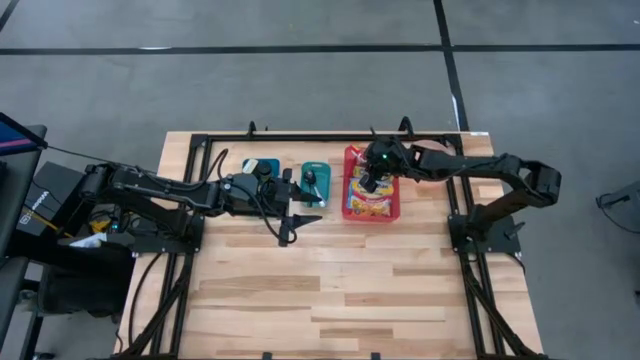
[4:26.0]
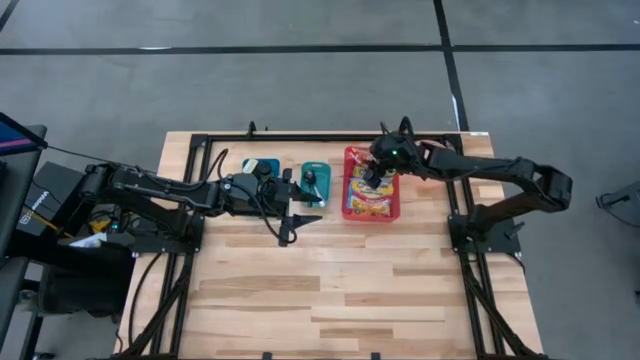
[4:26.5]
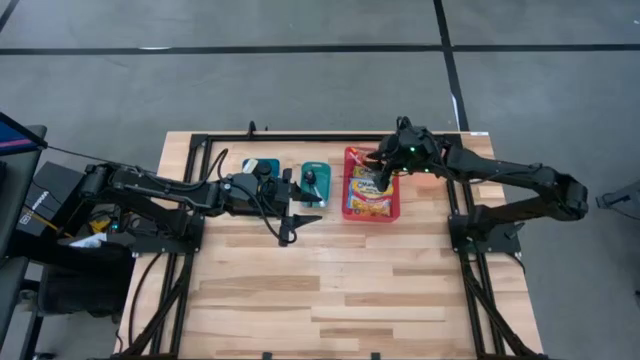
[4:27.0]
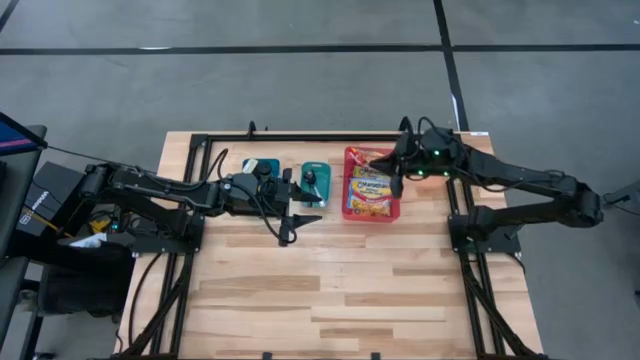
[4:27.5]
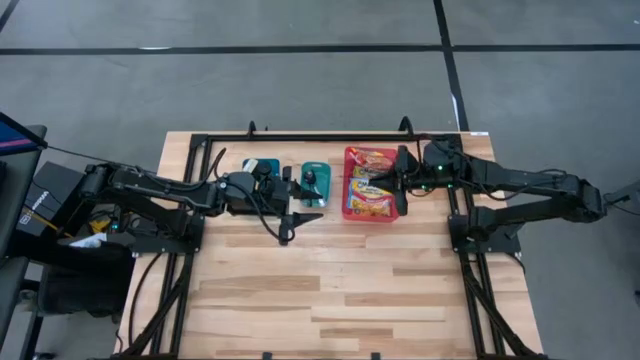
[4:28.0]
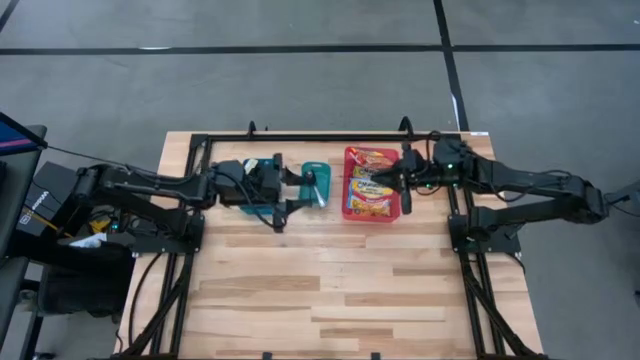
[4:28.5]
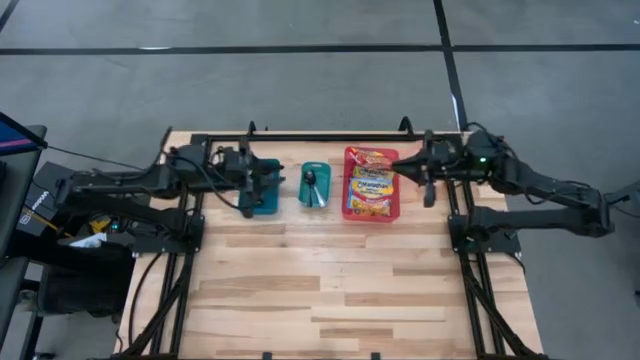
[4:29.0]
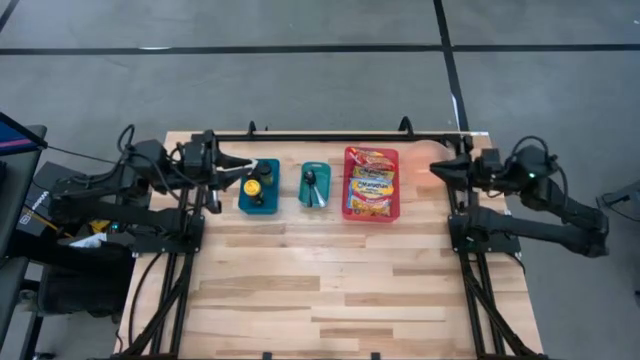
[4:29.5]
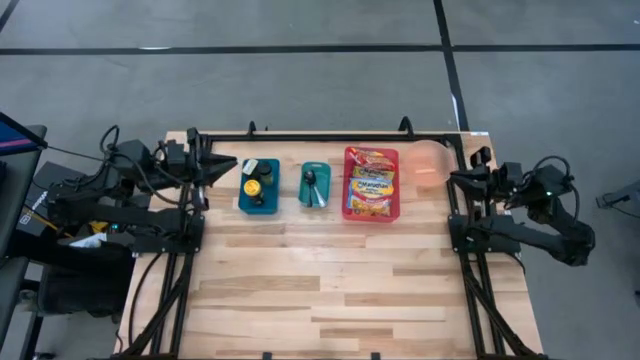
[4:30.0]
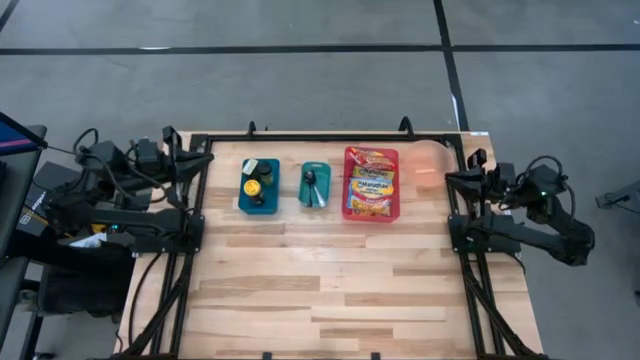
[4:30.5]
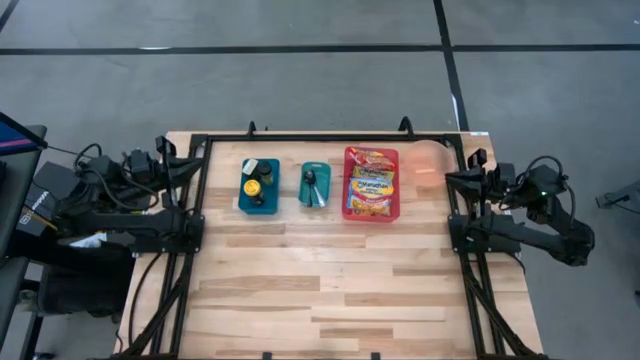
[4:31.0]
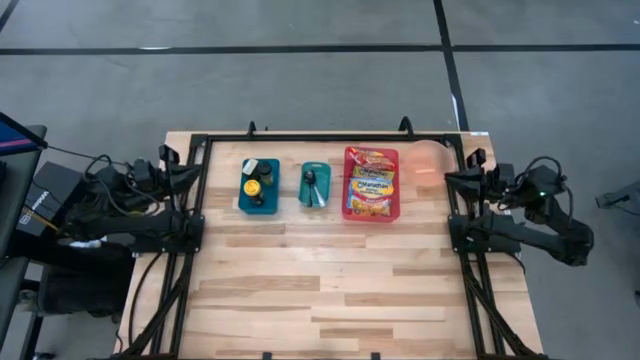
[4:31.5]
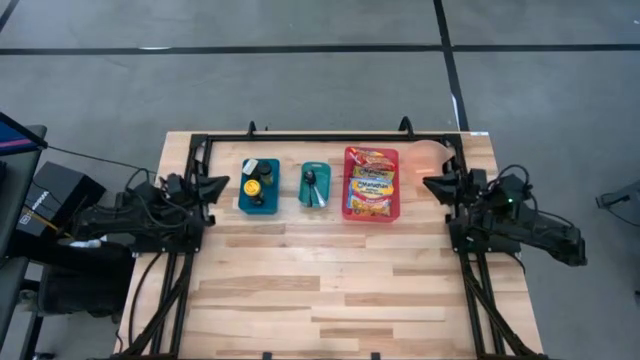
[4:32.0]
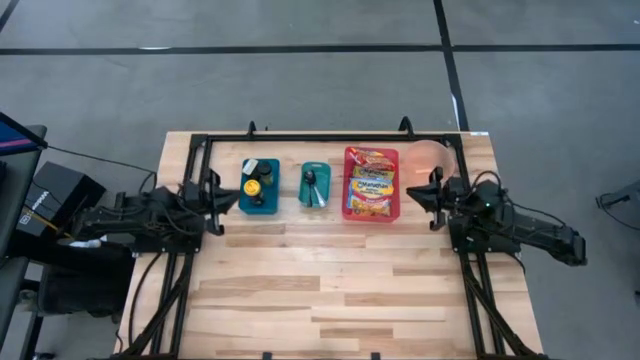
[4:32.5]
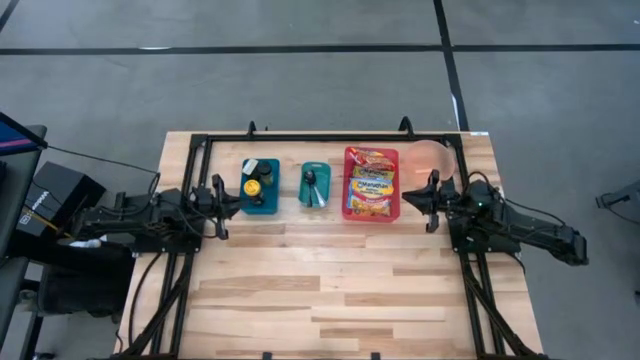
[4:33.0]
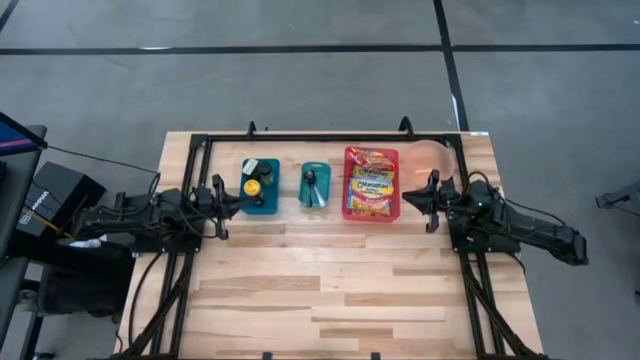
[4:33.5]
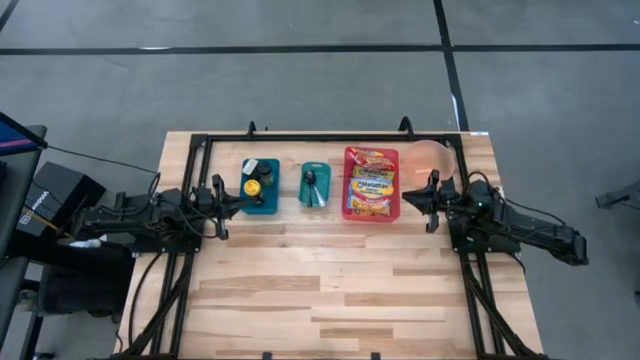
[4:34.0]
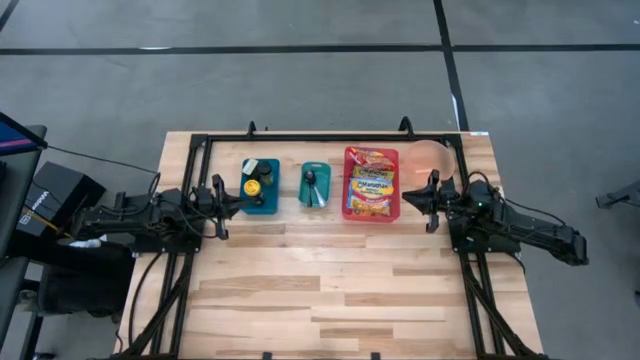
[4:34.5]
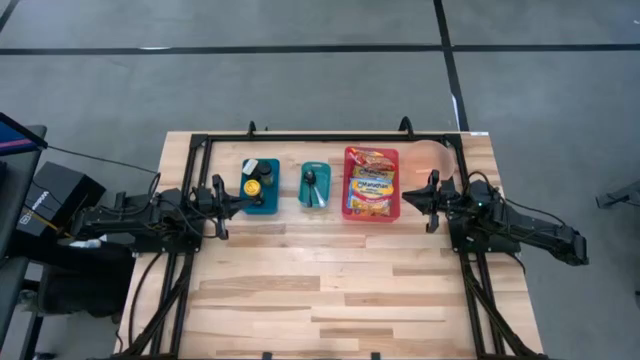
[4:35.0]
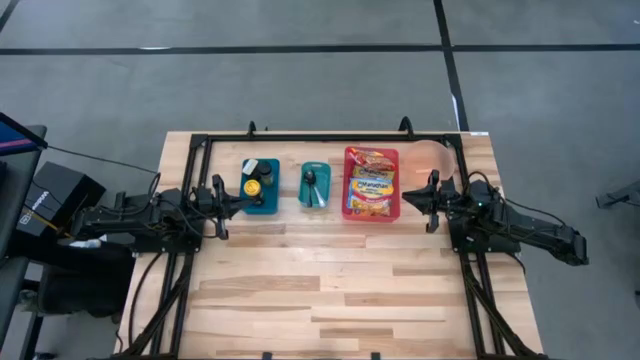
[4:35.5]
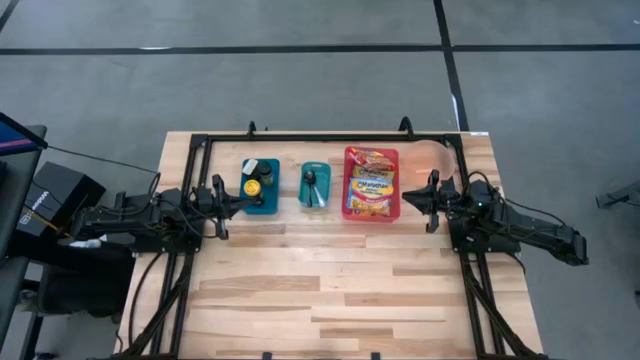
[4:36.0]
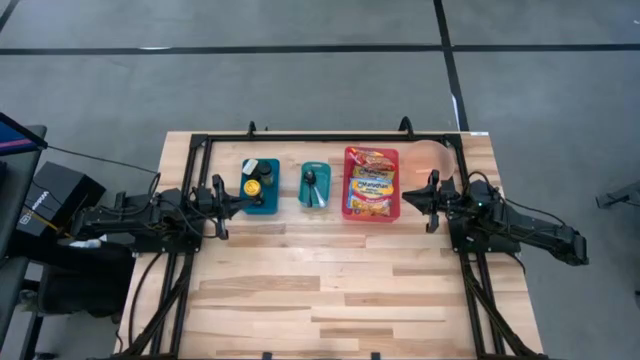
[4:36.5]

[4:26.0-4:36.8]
Task: Pick & Place Food Item
Return to Home Position

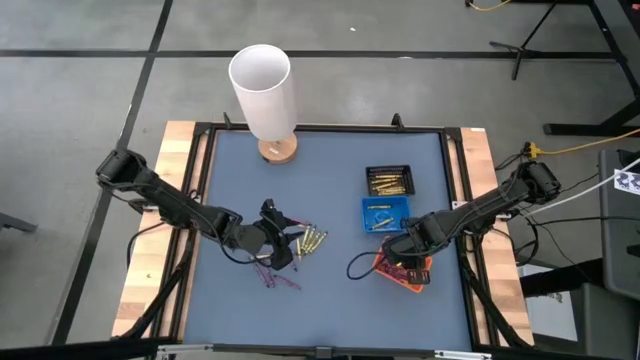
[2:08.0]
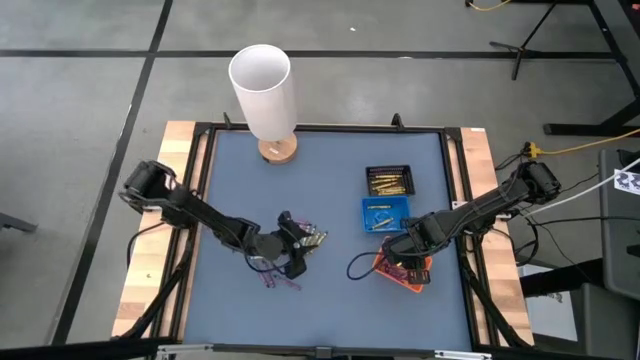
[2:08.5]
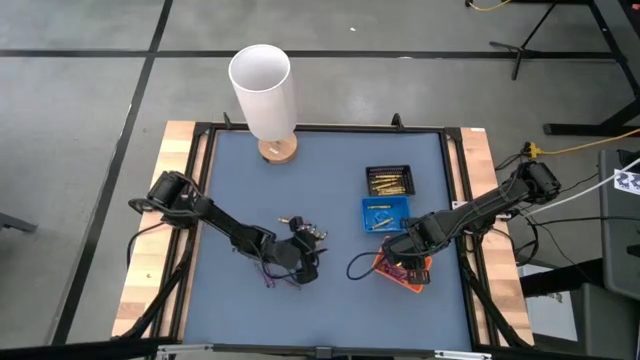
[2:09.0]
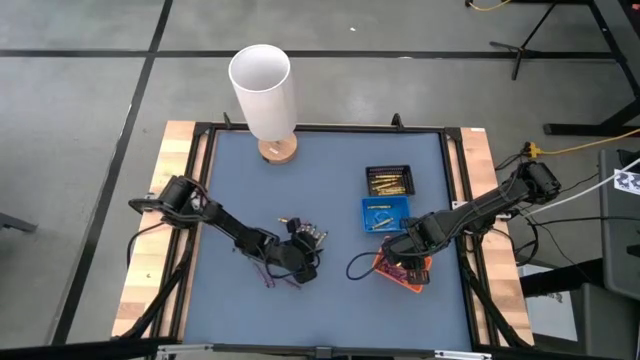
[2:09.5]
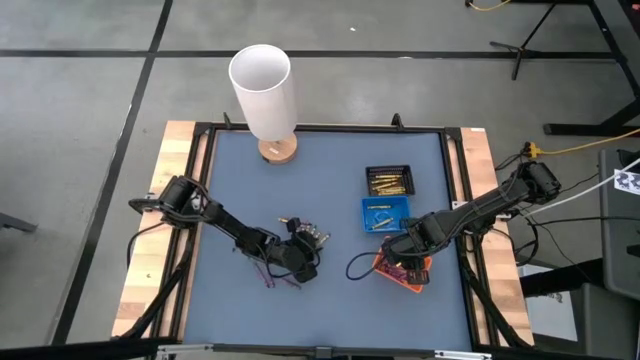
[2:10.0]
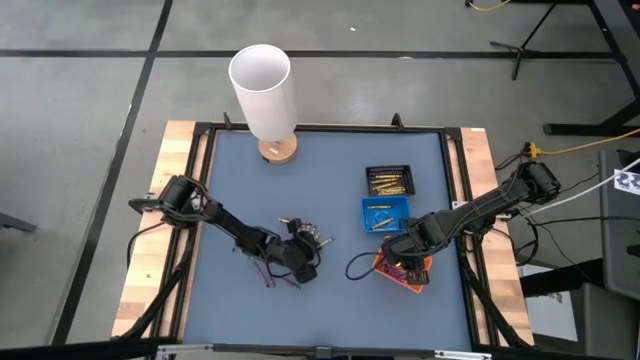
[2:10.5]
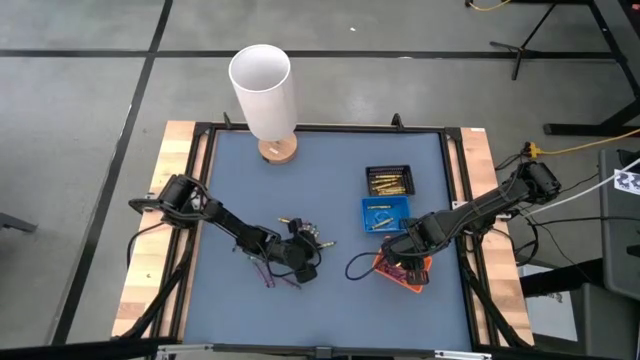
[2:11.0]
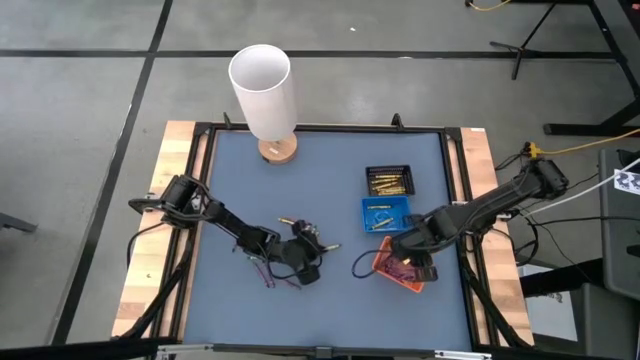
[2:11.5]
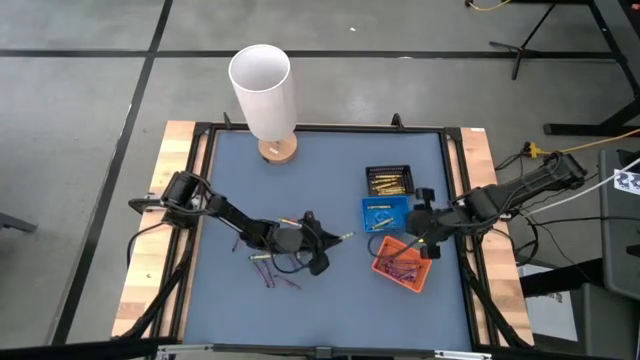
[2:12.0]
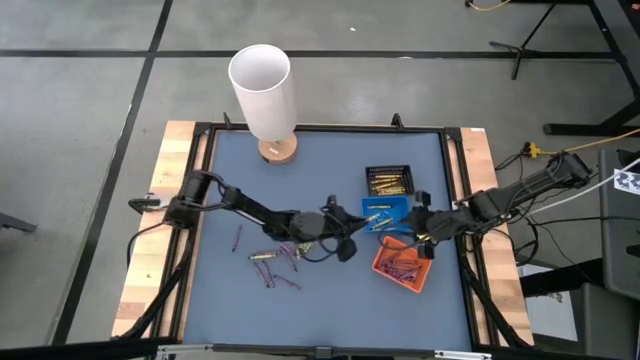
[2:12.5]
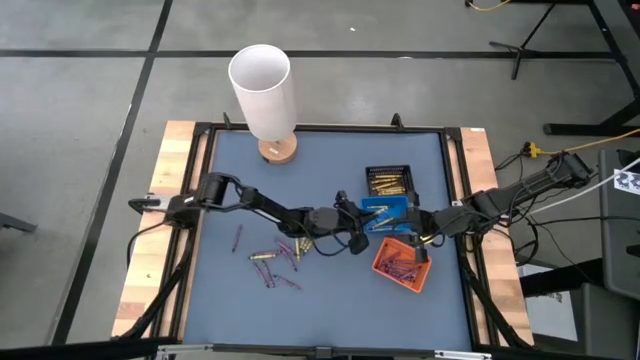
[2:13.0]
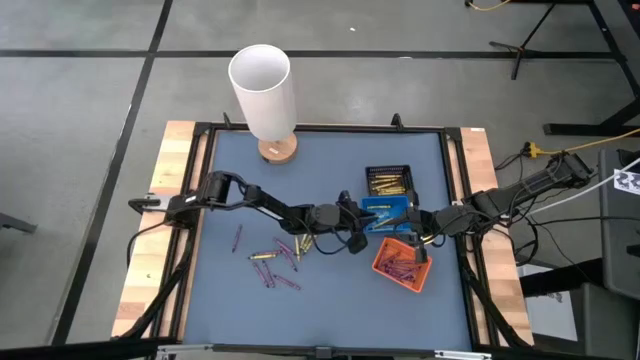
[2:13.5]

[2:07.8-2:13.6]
Task: Sort crayons
Put the green crayon into the blue bin

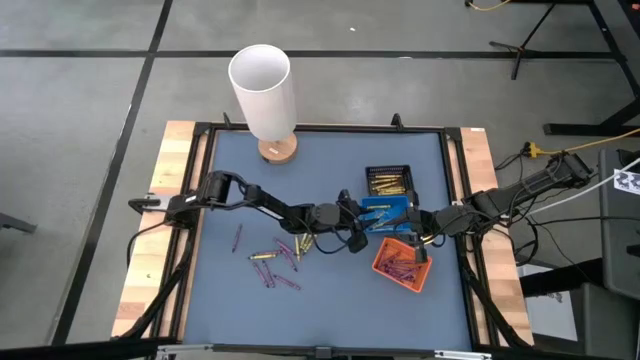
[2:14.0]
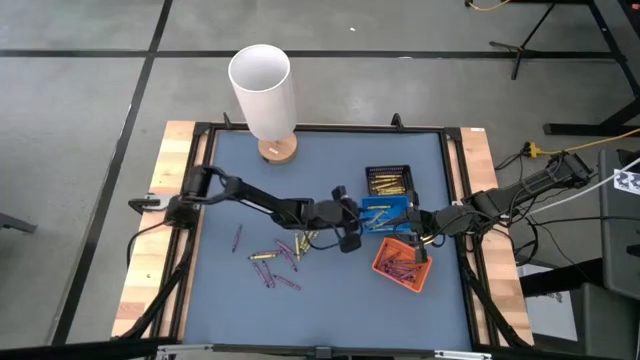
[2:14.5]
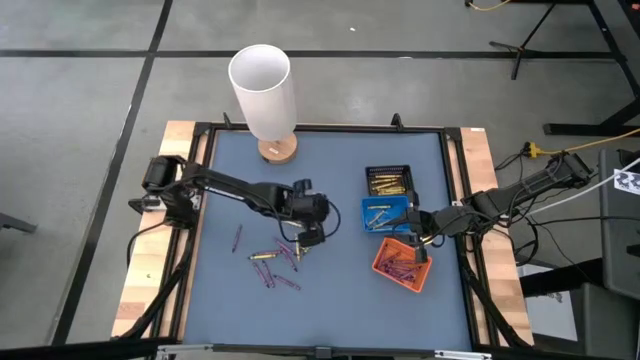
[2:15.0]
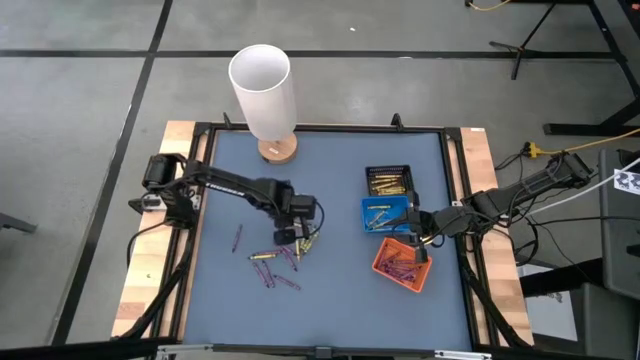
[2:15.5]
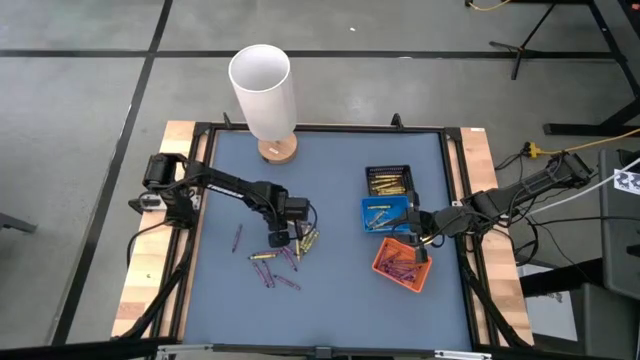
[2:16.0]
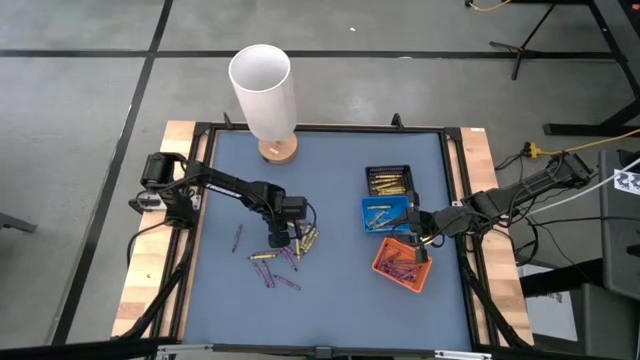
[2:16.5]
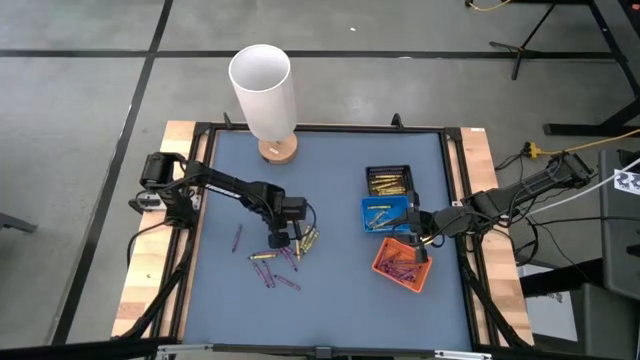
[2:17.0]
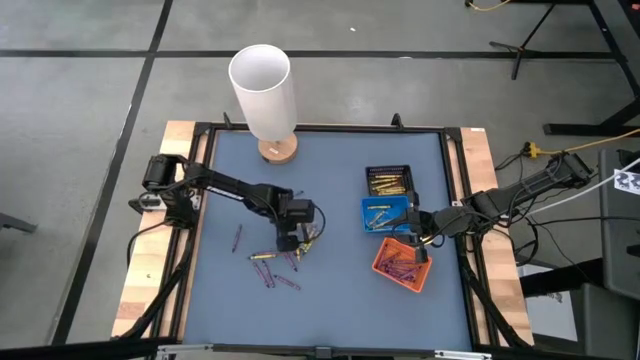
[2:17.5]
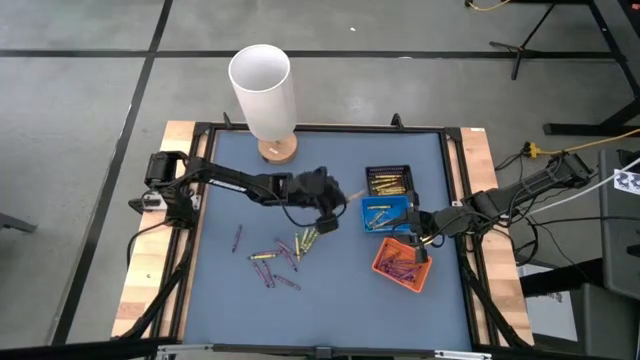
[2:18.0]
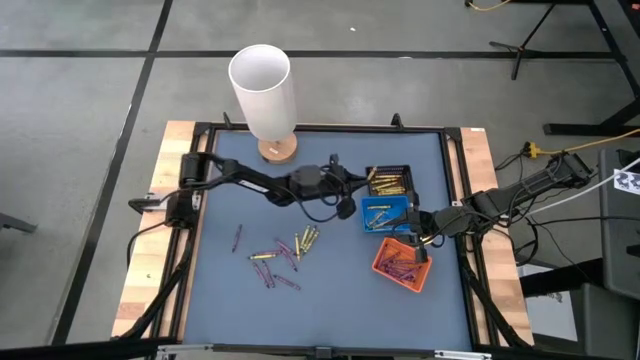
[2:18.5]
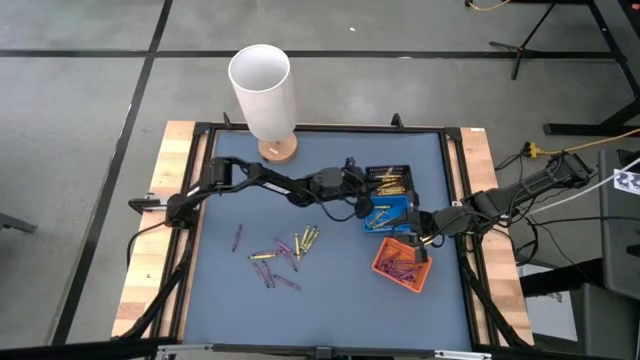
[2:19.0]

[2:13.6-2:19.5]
Put the yellow crayon into the black bin
